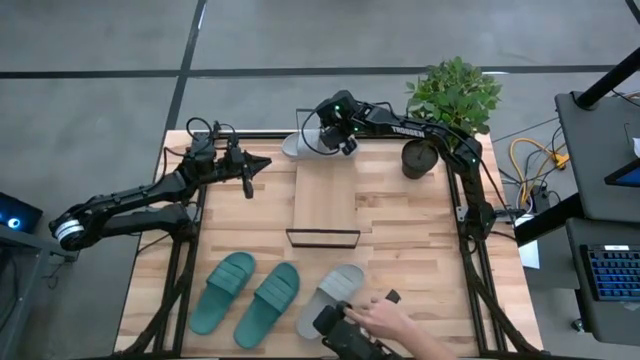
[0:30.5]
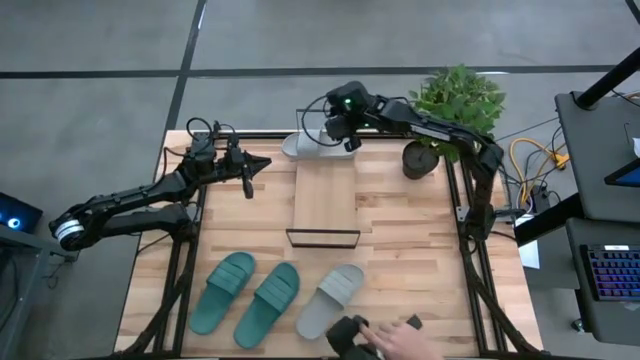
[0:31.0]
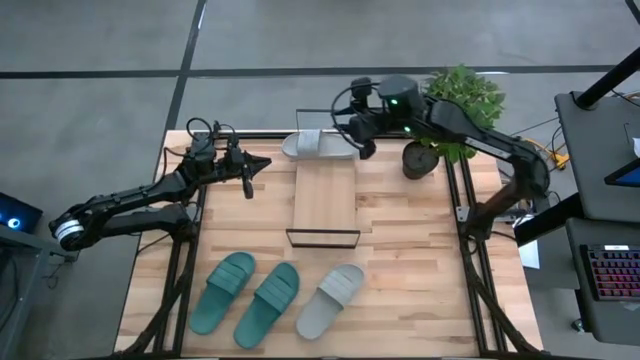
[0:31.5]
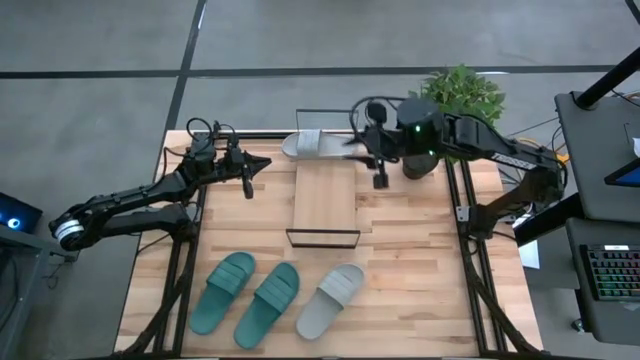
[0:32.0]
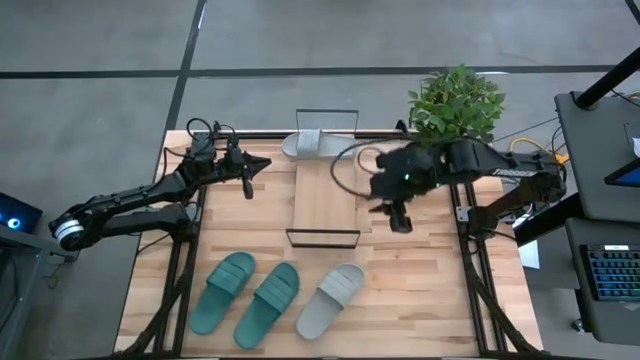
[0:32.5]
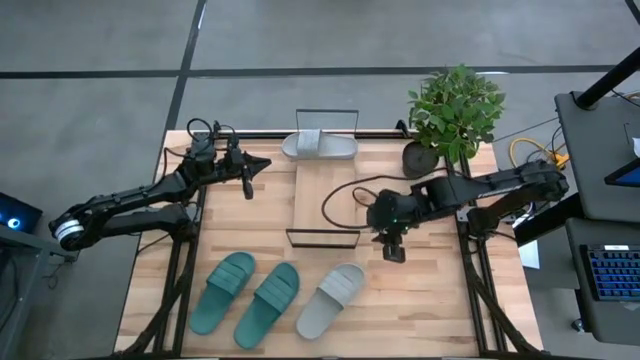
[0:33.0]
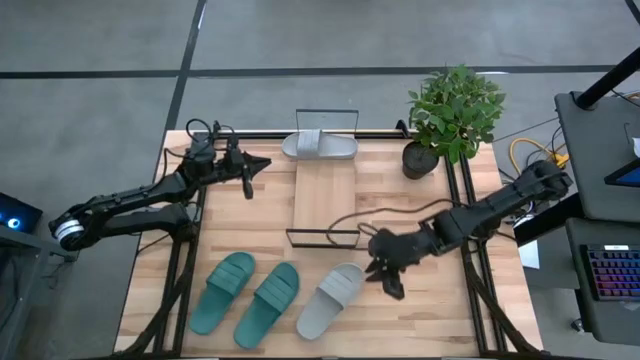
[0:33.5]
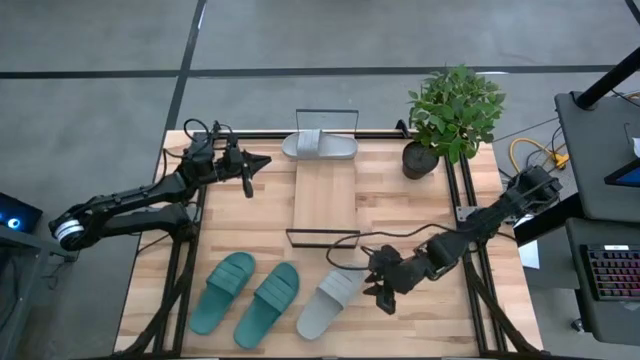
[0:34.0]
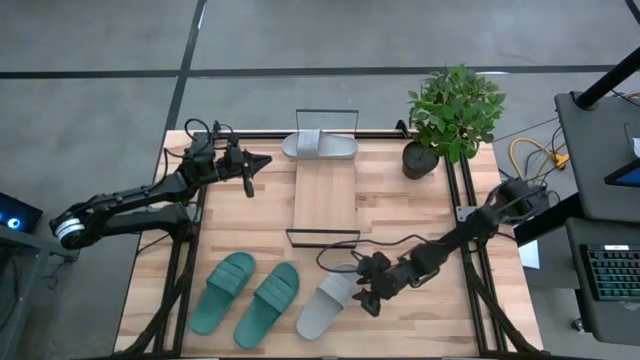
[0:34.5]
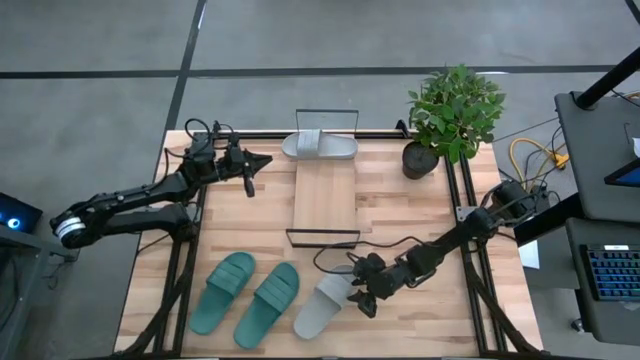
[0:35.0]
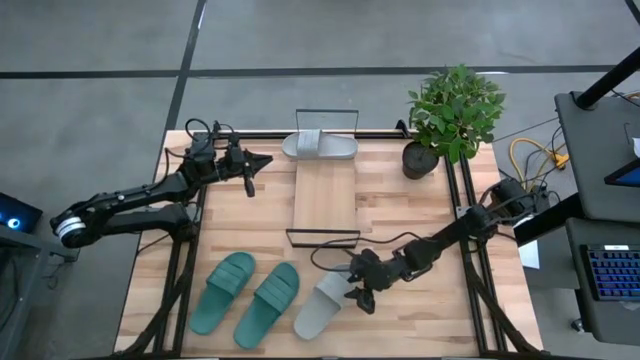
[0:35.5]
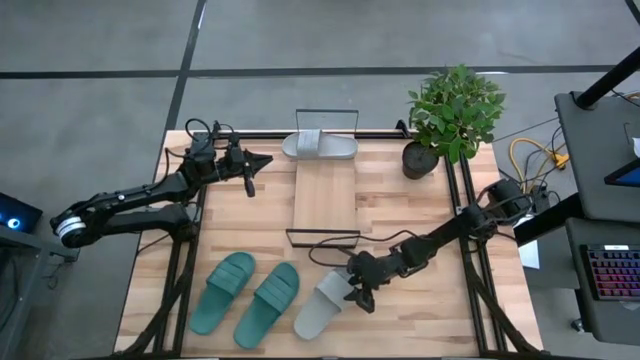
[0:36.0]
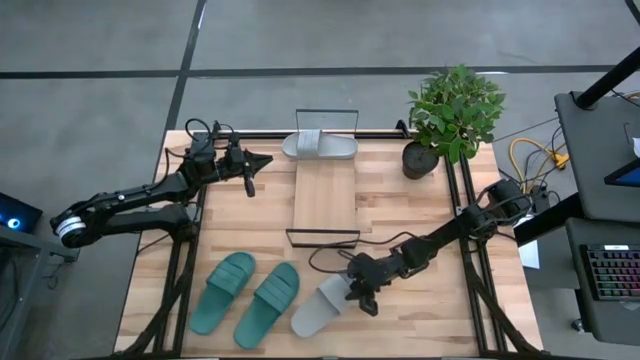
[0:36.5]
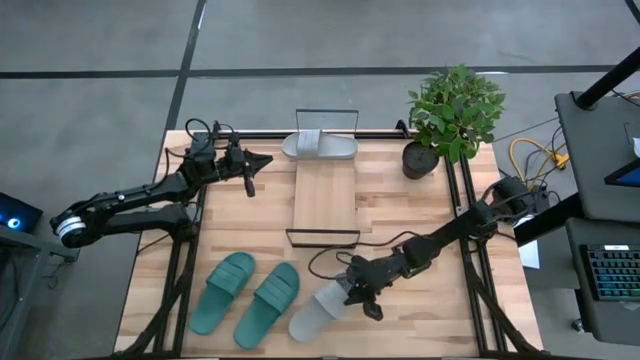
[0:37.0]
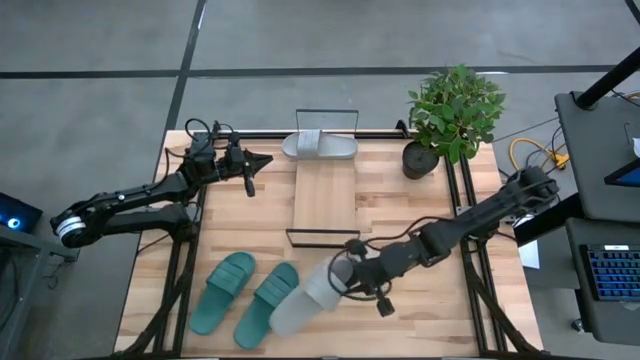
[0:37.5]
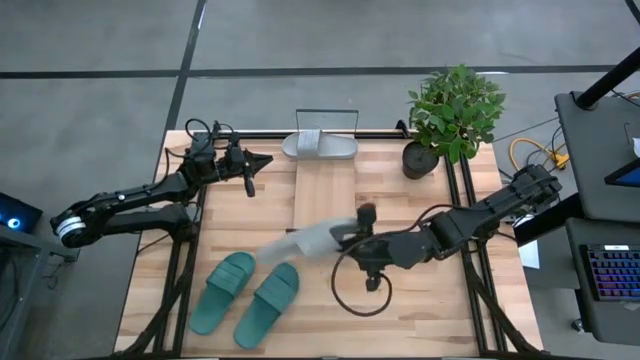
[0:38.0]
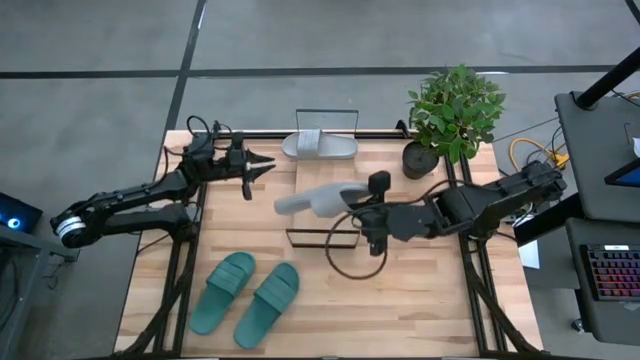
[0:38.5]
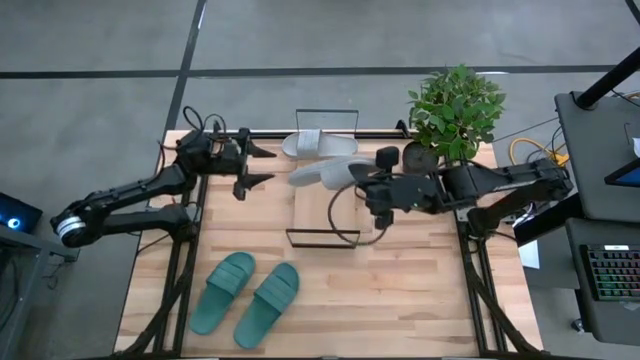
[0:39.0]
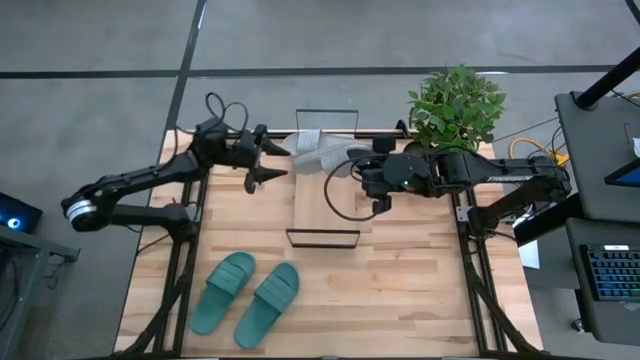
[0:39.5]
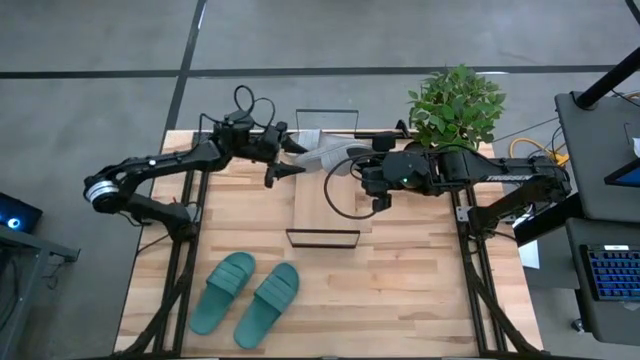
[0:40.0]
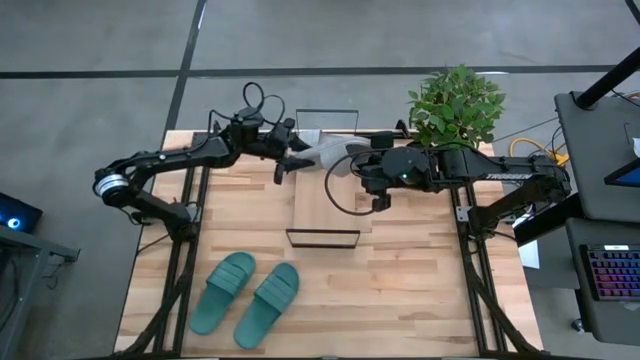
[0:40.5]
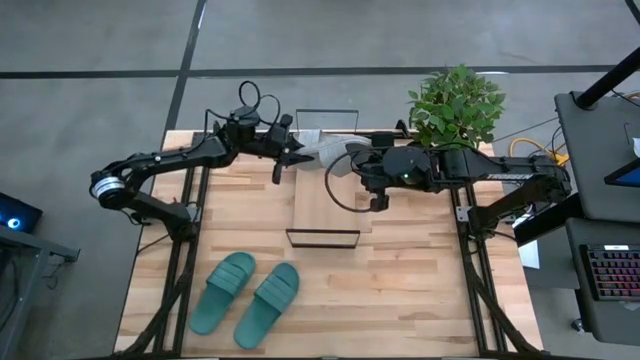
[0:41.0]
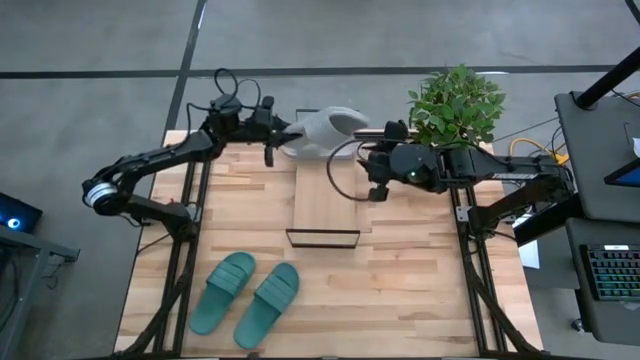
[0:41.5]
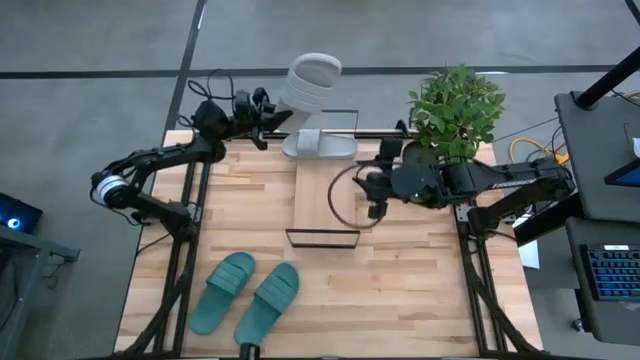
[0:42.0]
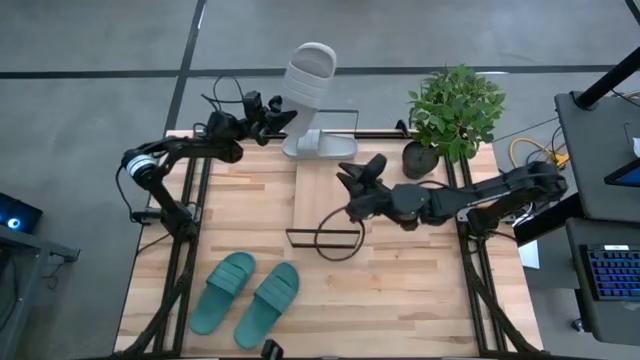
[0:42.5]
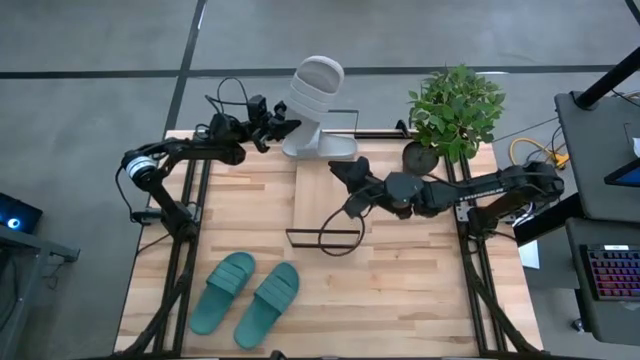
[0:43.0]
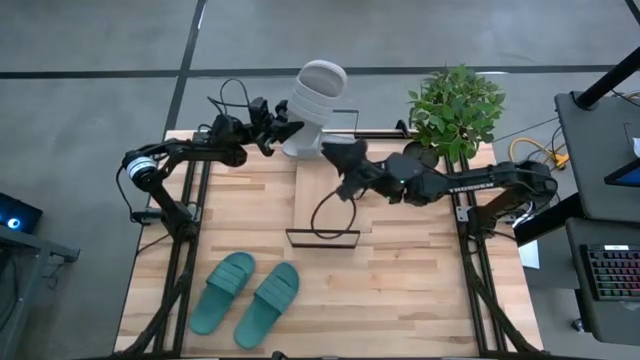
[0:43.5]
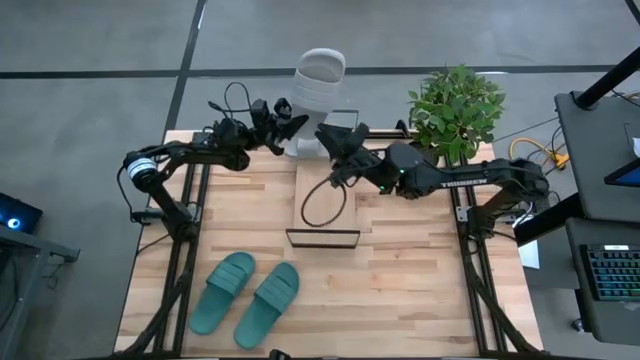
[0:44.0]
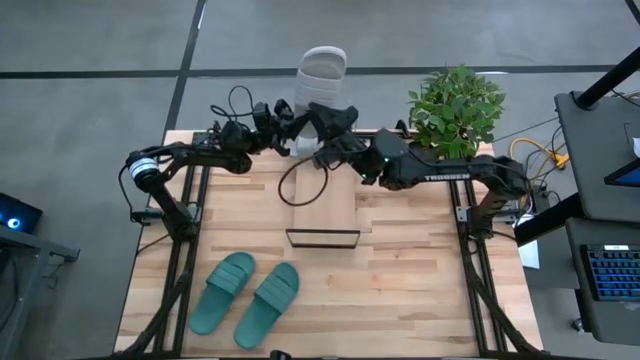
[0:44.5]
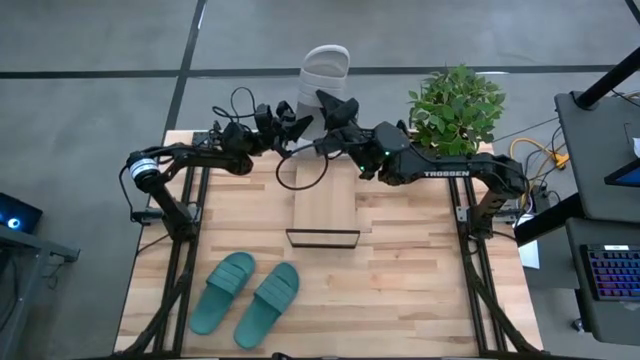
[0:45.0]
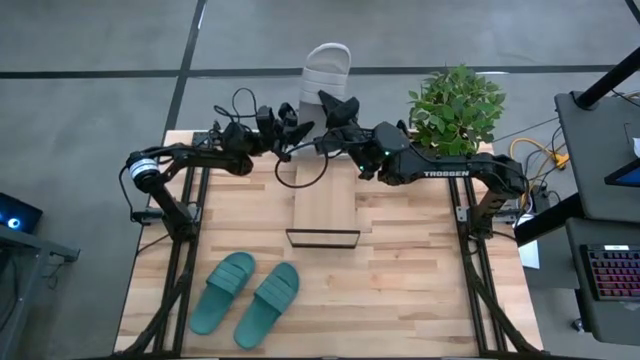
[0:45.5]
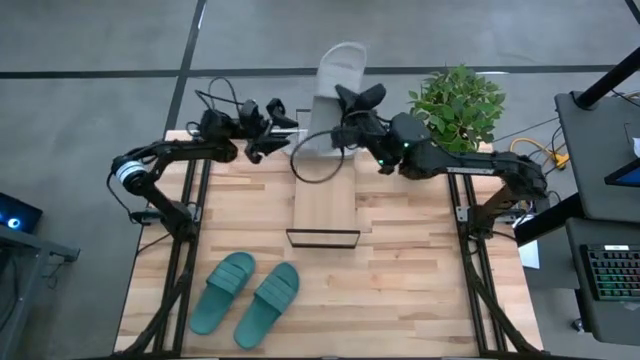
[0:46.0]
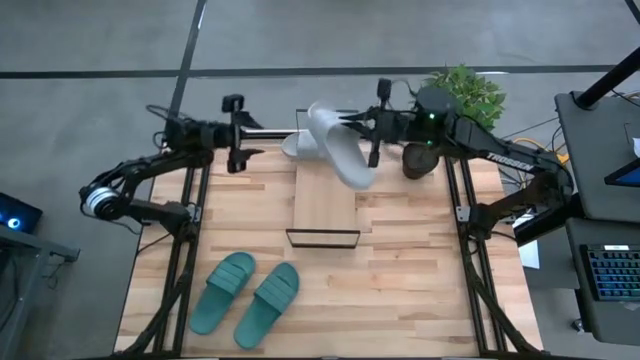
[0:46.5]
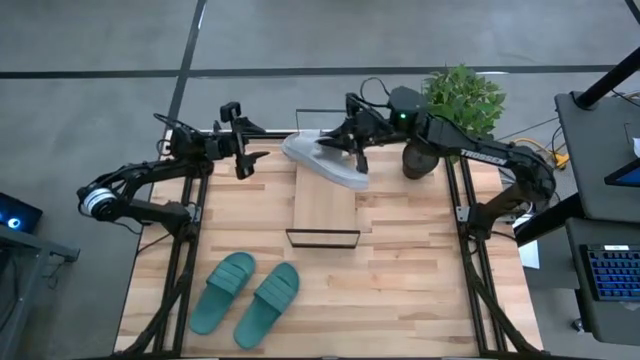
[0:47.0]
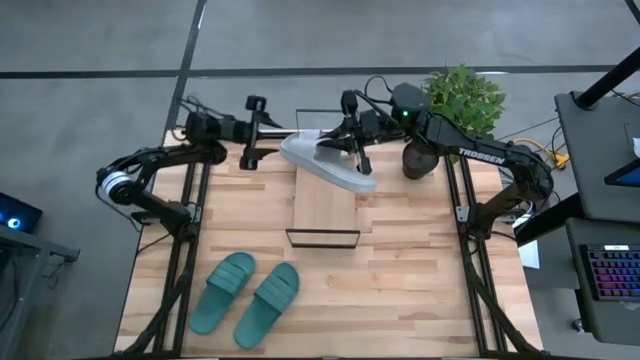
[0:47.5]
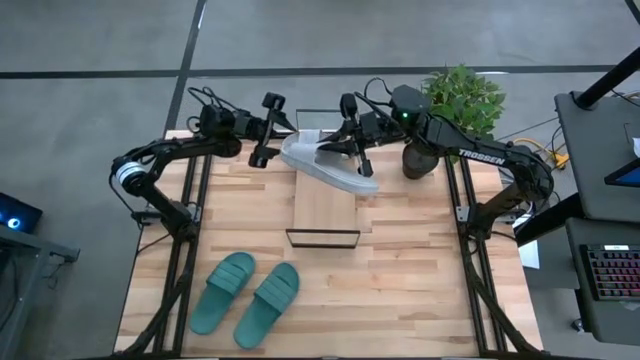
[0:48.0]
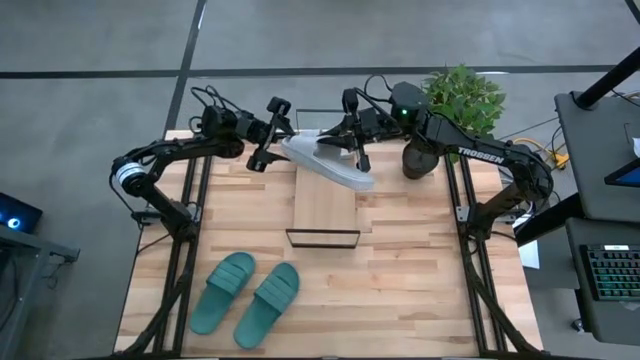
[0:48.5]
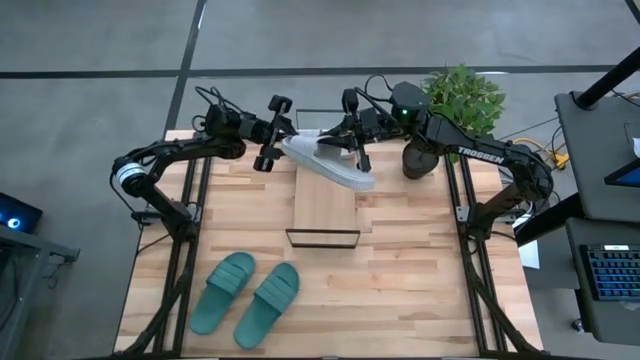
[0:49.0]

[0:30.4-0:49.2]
Task: Pick and place slides into the shelf
Put the gray slipper on the shelf

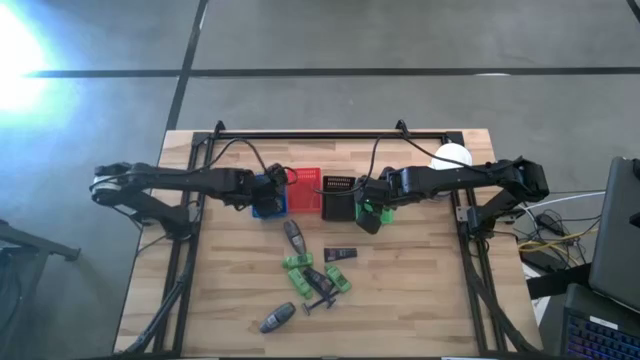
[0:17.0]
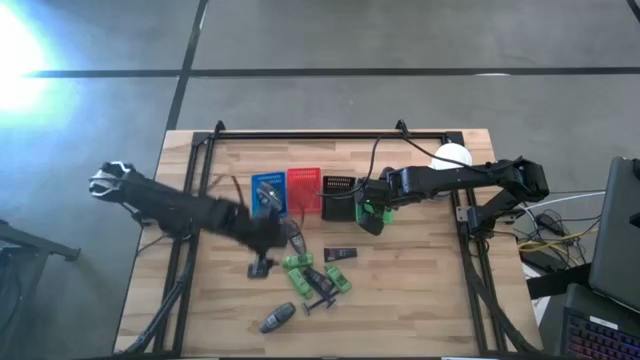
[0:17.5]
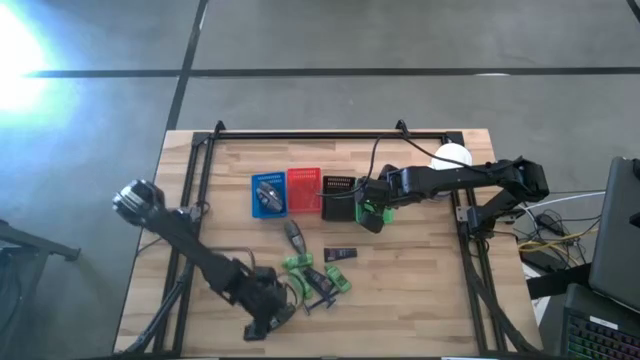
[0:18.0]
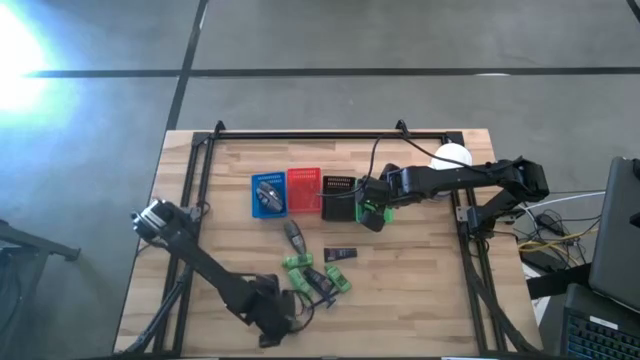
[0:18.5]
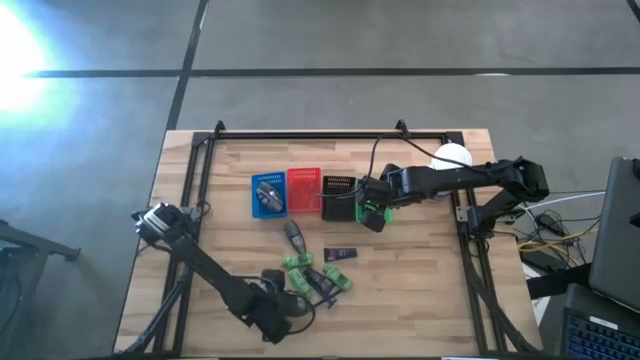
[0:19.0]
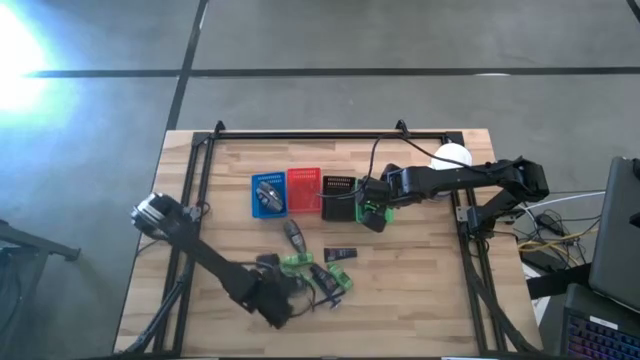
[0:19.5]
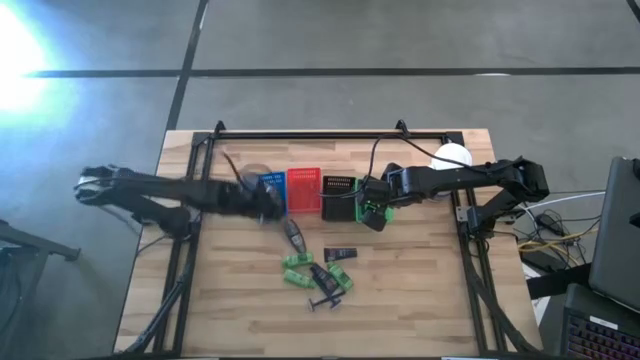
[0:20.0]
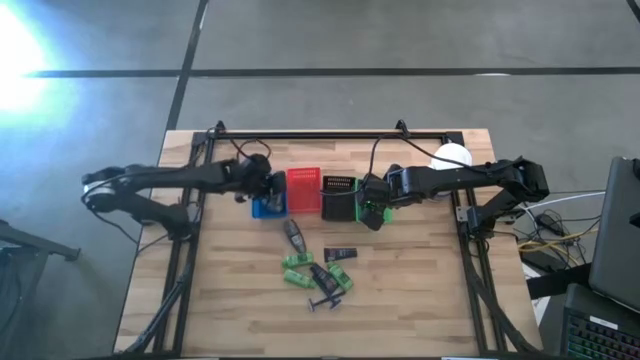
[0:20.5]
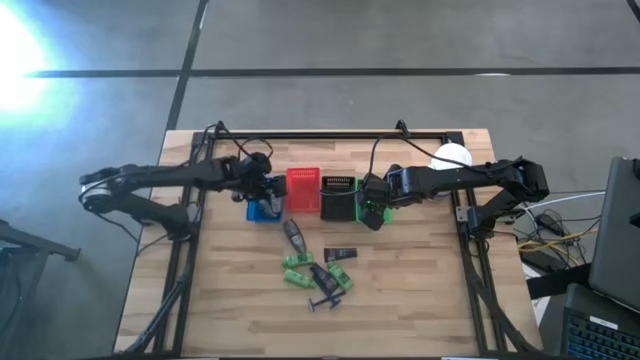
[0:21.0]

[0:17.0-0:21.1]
Task: Pick & Place Travel size toiletries
Put the gray deodorant into the blue bin
